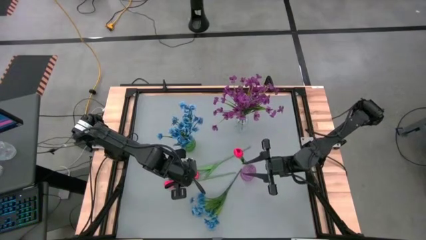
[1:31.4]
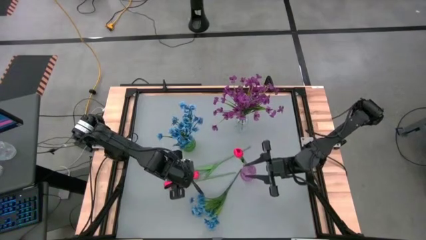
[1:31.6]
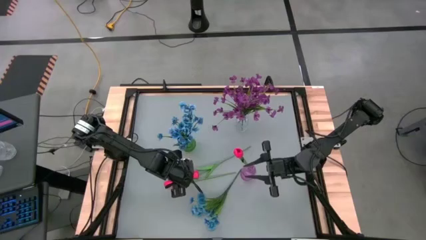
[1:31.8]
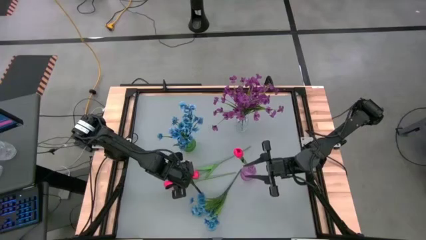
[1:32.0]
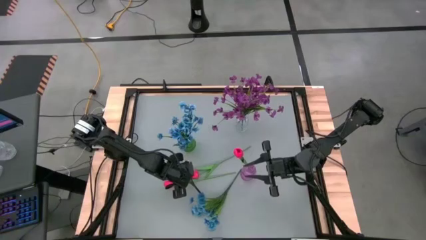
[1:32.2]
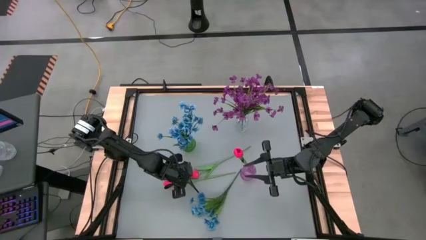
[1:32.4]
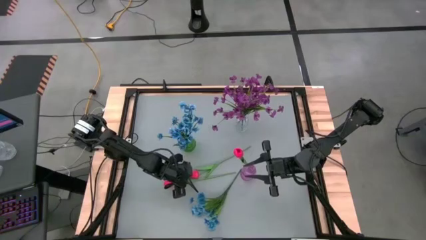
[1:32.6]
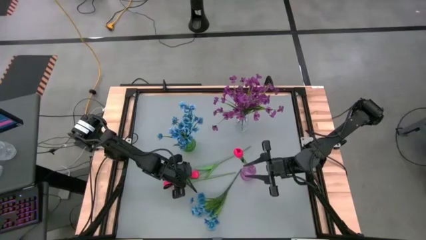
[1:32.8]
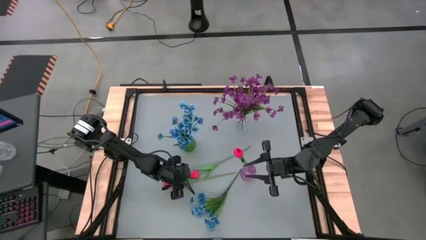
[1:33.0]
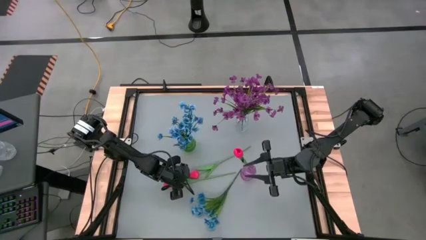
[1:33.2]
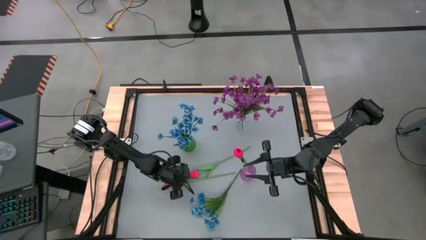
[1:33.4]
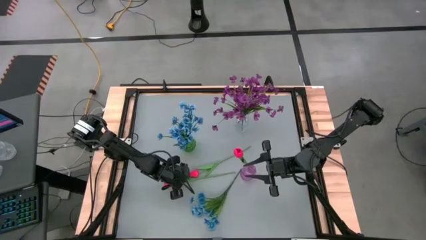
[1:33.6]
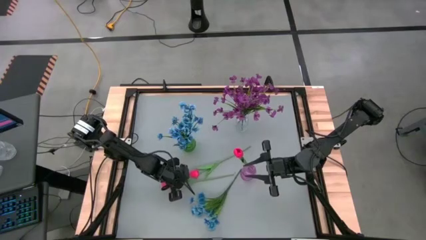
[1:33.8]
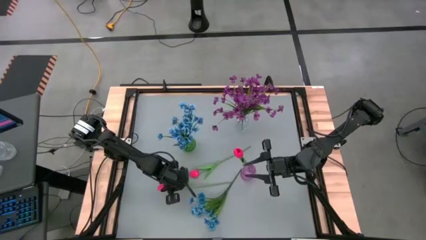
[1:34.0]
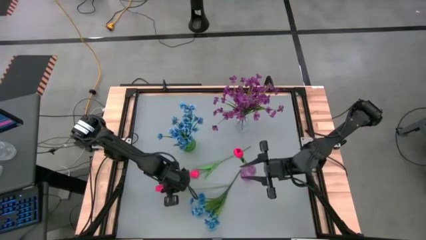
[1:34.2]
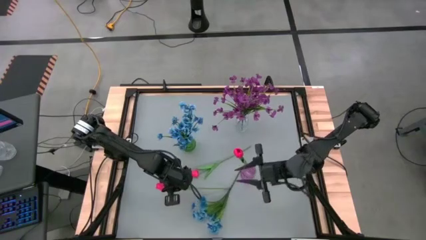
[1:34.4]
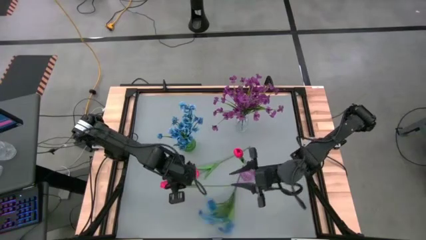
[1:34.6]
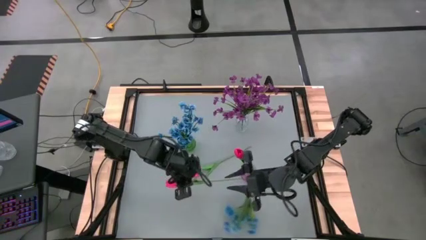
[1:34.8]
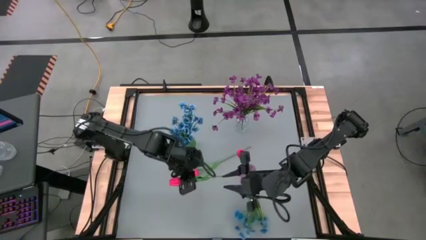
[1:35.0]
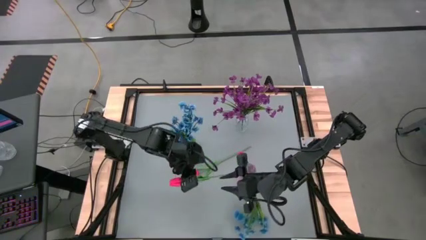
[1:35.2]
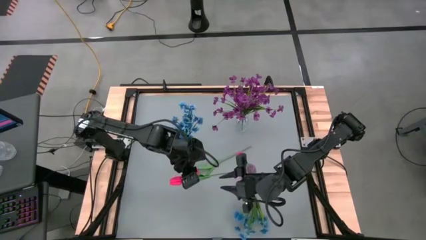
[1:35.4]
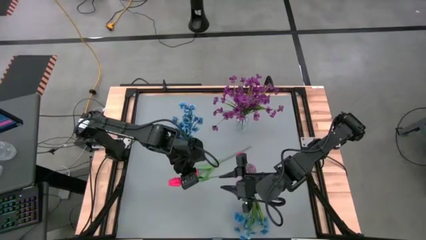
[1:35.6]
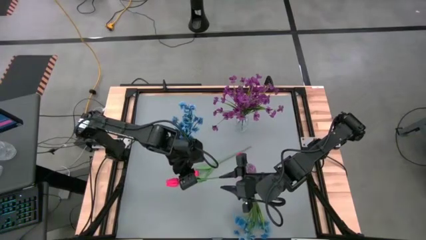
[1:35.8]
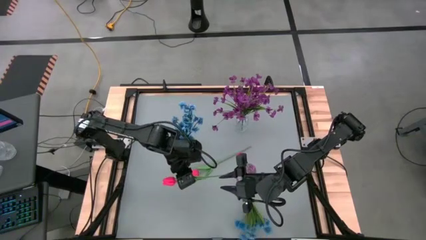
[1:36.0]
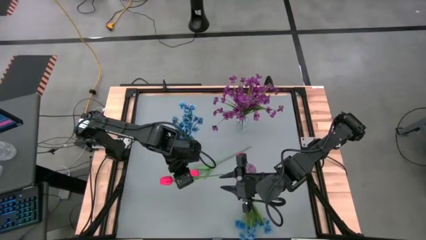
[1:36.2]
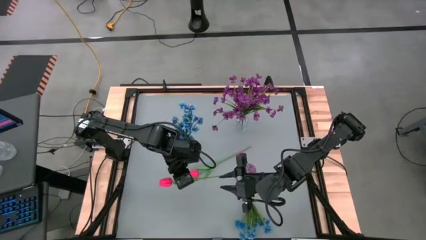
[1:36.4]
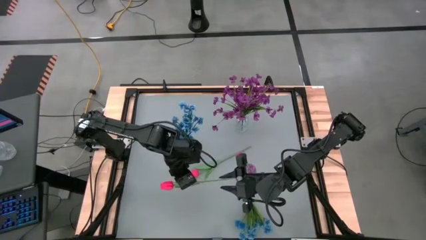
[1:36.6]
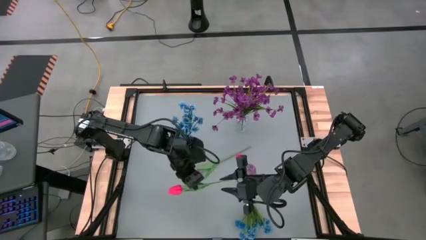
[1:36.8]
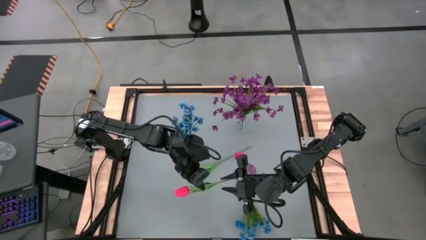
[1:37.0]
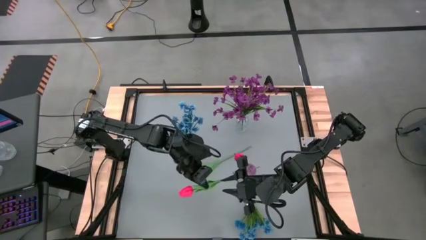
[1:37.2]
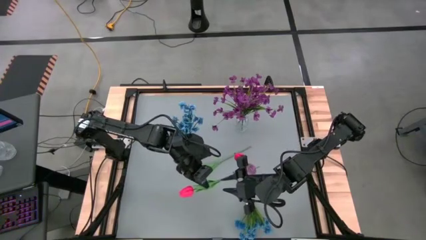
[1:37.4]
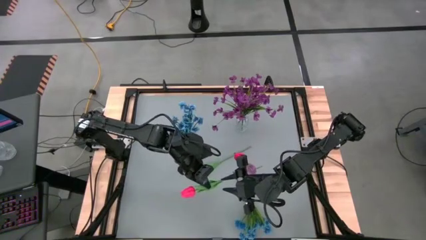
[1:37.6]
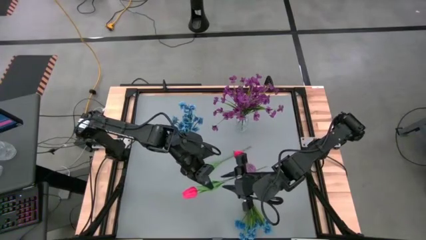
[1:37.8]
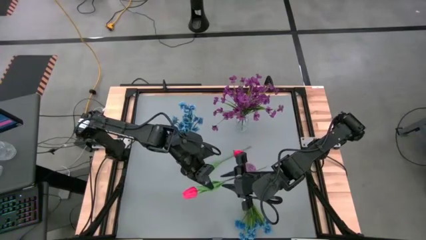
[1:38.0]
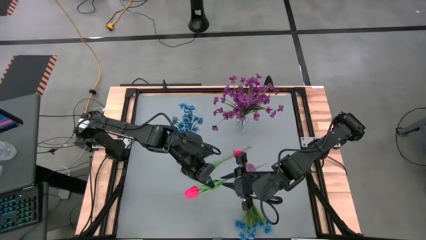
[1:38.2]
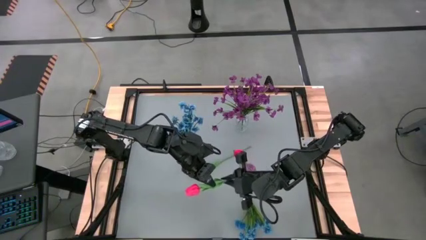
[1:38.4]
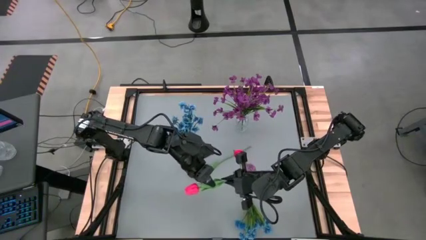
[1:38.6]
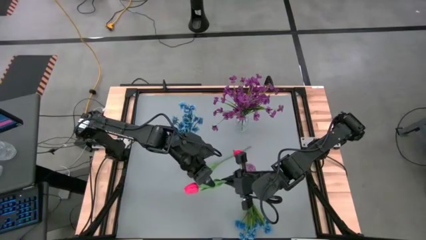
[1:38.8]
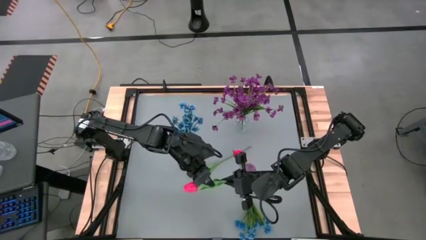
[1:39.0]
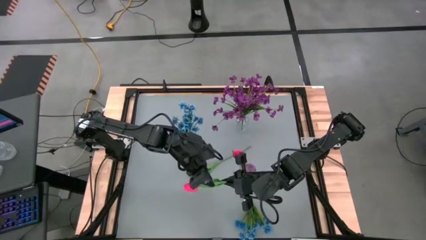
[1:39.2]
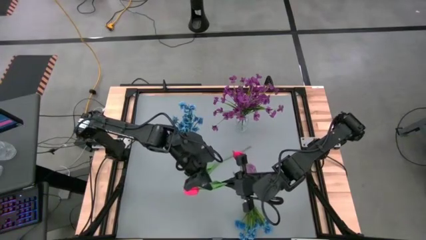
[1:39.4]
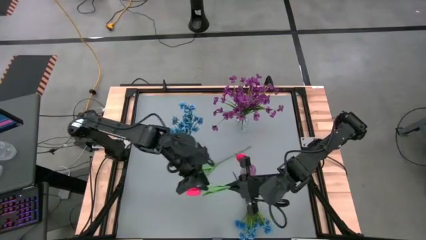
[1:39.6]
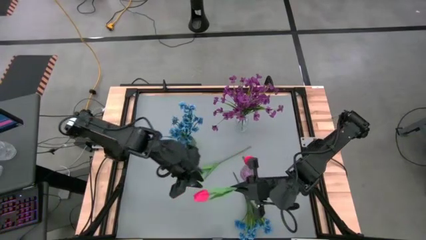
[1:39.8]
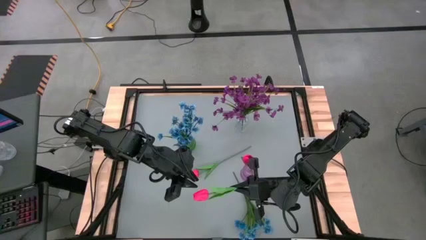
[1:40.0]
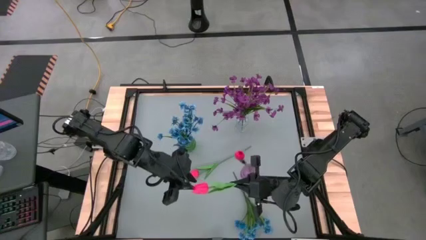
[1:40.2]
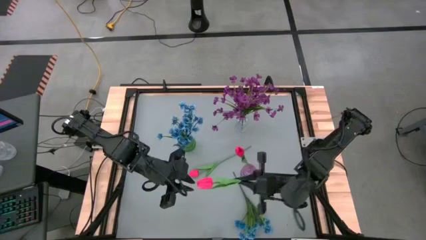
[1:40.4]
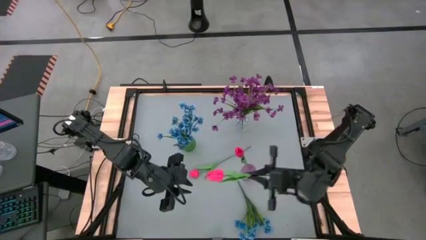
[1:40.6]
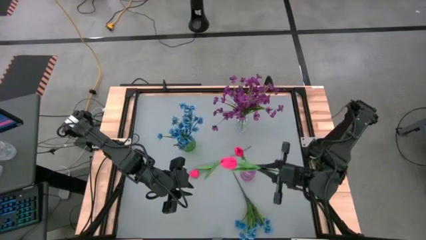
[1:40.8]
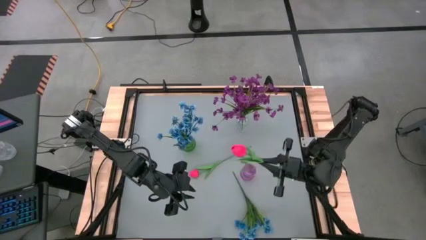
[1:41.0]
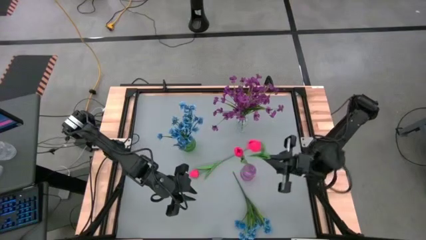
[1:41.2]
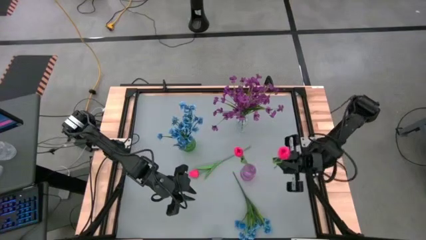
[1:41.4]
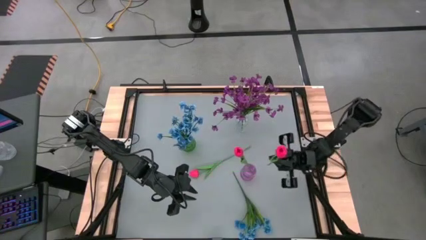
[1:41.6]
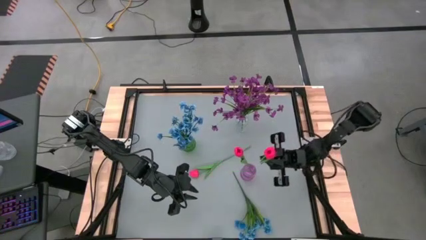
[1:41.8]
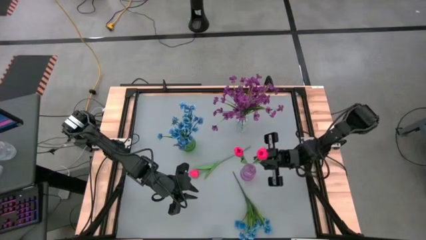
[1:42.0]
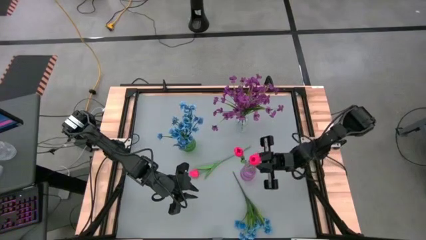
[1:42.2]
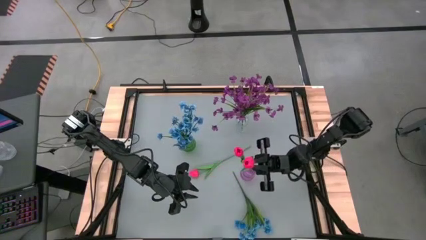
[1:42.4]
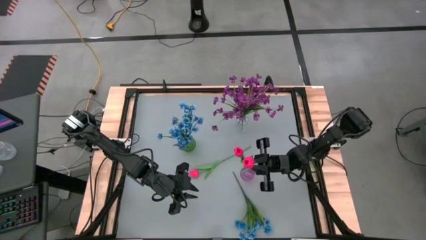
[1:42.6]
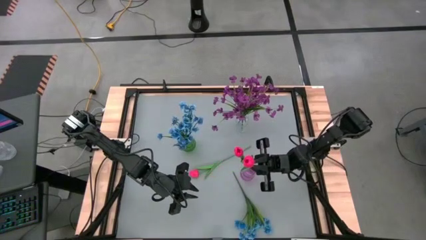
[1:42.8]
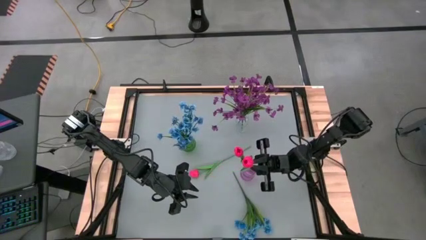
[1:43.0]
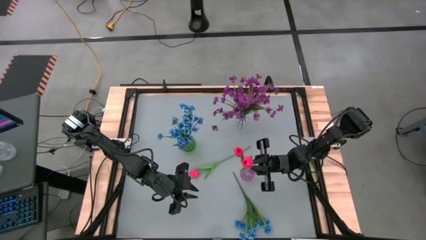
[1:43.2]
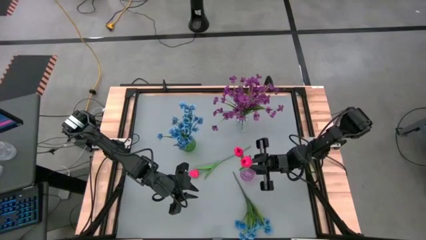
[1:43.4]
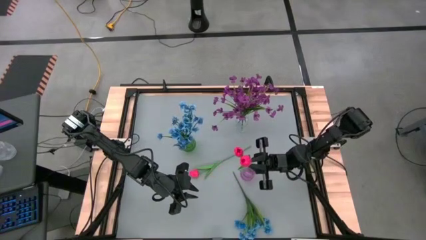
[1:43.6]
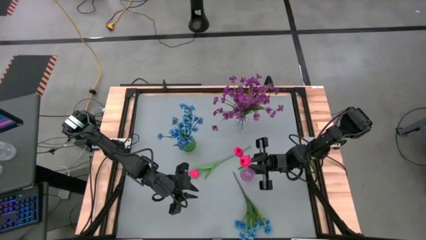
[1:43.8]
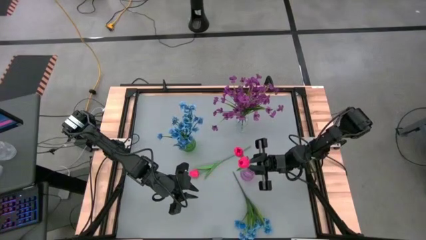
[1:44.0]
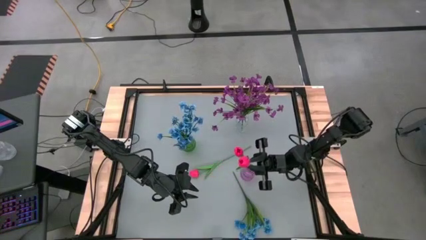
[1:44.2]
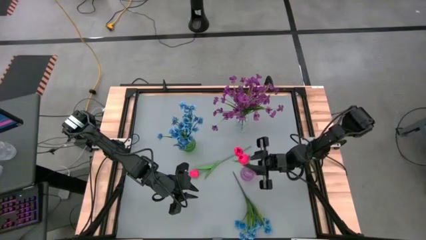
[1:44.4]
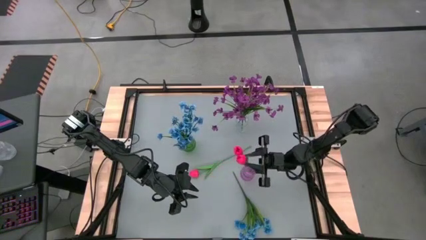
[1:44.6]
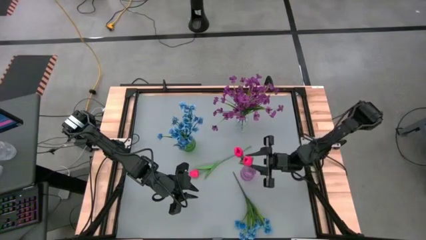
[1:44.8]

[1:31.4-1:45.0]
Task: Sort flowers into vase by color
Put the left pink tulip into the purple flower vase
